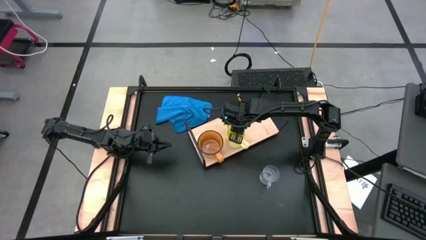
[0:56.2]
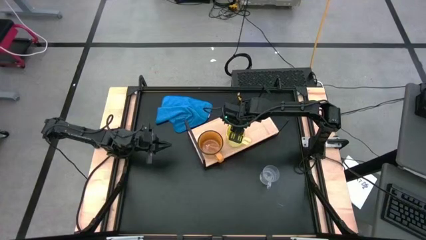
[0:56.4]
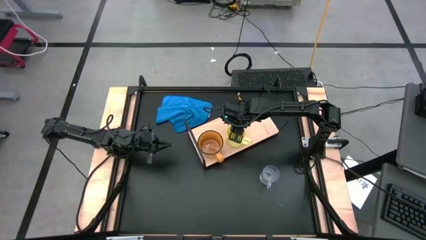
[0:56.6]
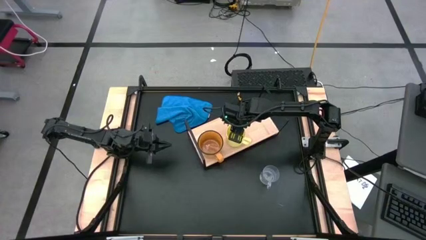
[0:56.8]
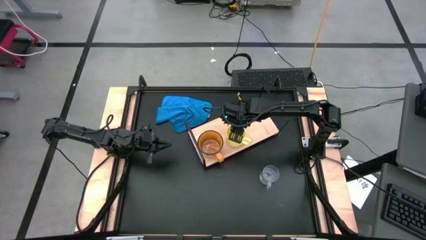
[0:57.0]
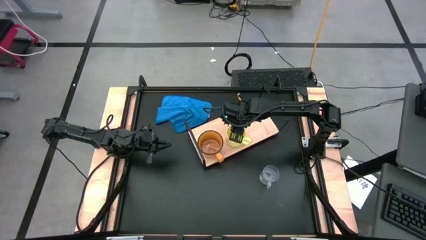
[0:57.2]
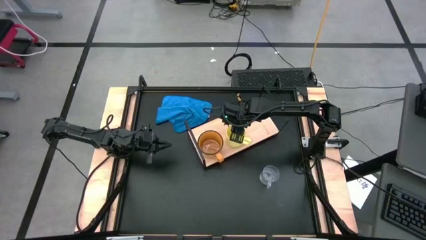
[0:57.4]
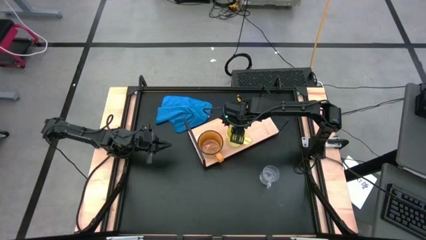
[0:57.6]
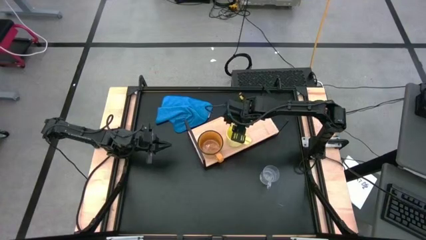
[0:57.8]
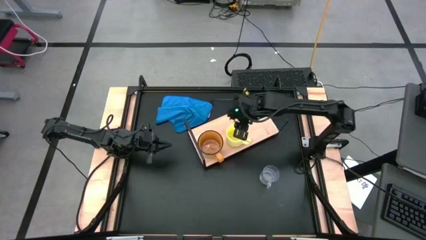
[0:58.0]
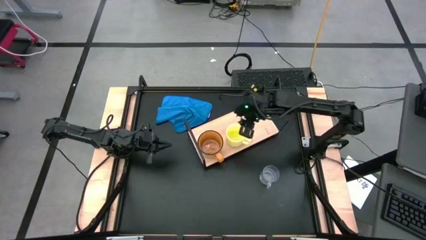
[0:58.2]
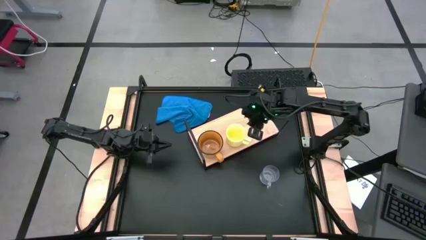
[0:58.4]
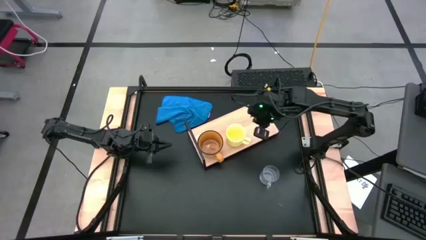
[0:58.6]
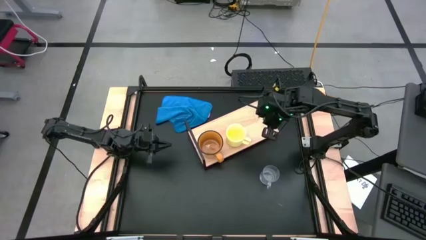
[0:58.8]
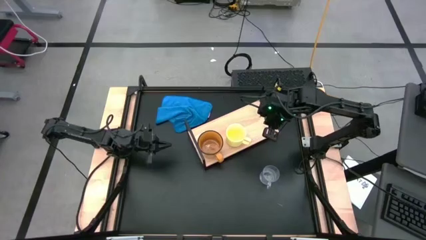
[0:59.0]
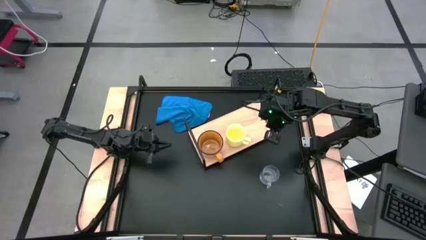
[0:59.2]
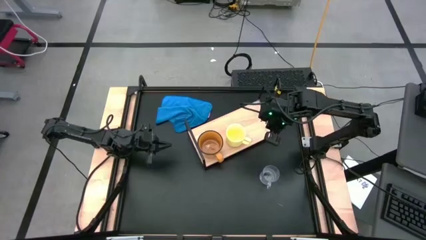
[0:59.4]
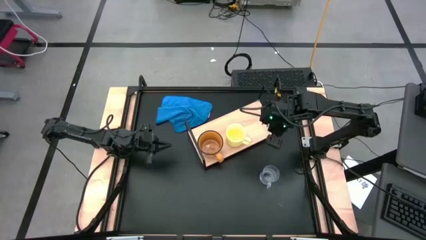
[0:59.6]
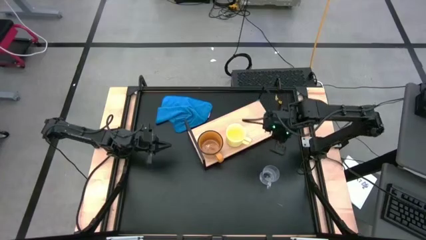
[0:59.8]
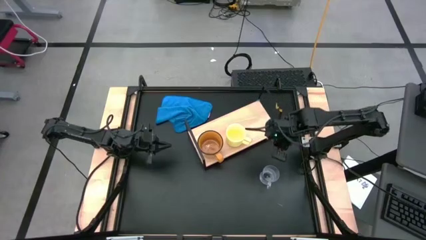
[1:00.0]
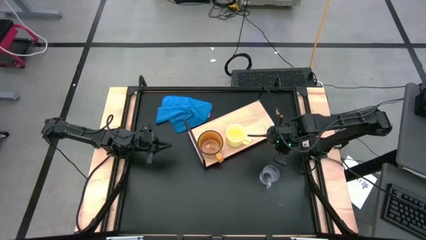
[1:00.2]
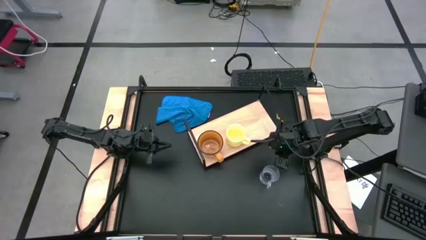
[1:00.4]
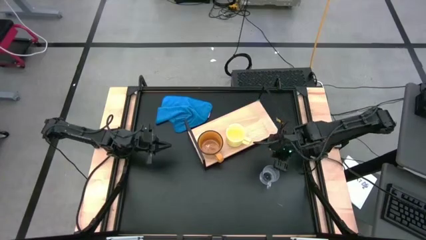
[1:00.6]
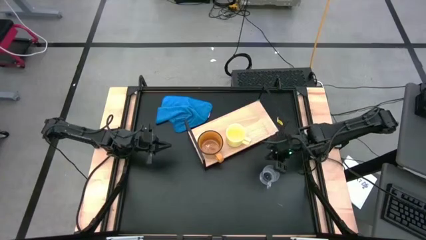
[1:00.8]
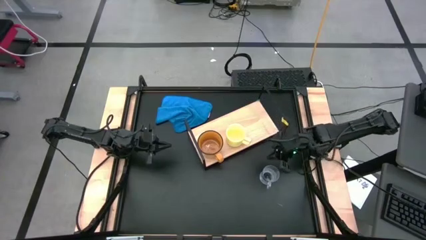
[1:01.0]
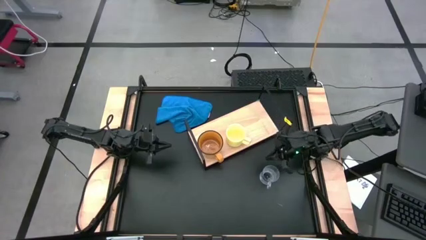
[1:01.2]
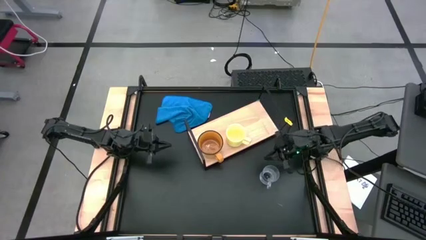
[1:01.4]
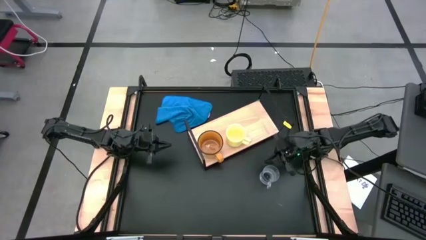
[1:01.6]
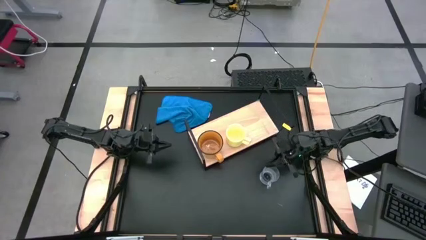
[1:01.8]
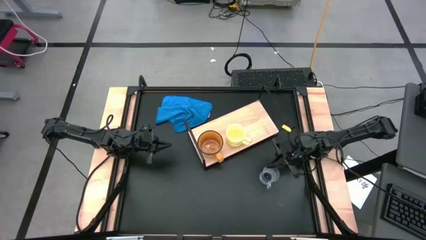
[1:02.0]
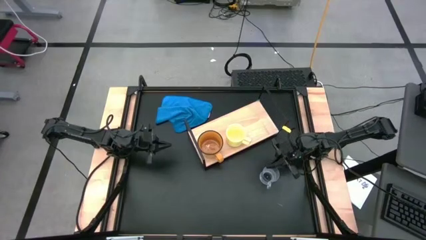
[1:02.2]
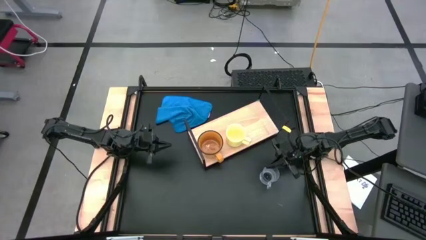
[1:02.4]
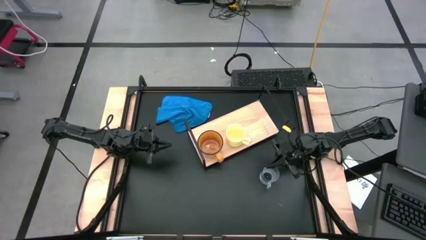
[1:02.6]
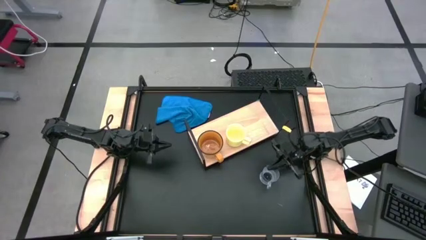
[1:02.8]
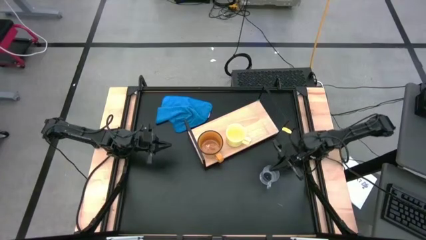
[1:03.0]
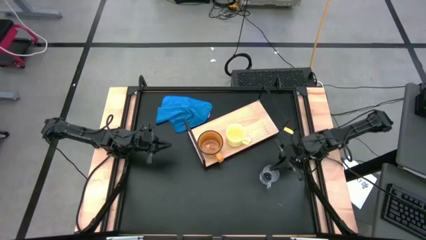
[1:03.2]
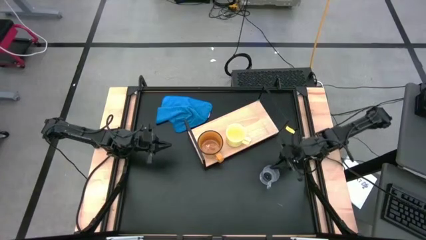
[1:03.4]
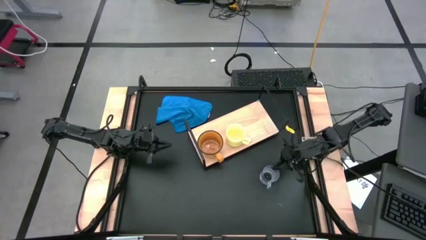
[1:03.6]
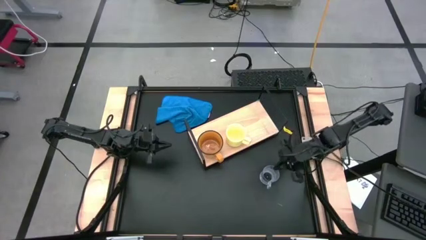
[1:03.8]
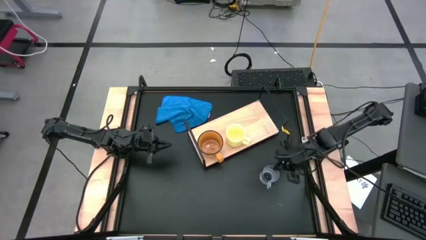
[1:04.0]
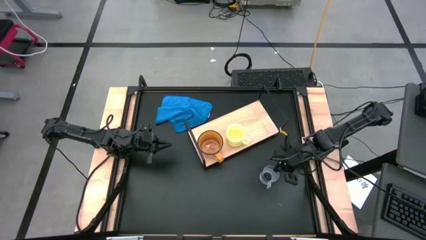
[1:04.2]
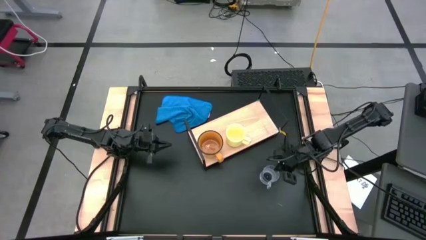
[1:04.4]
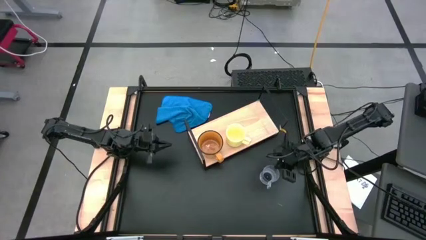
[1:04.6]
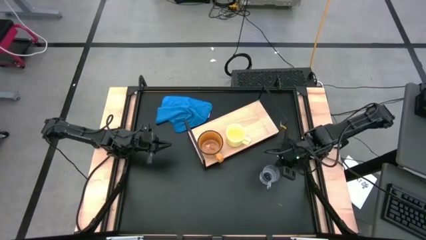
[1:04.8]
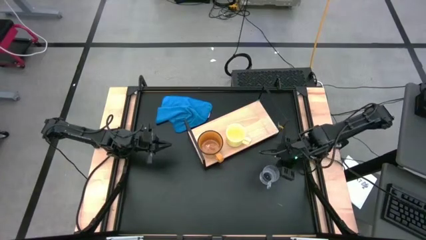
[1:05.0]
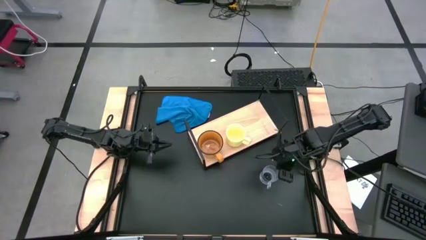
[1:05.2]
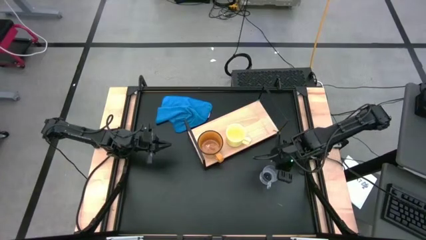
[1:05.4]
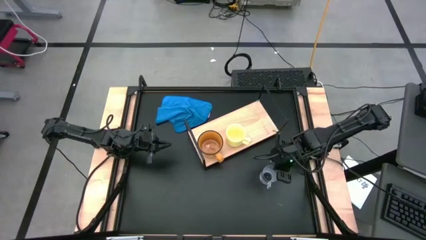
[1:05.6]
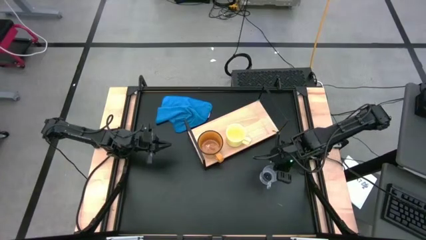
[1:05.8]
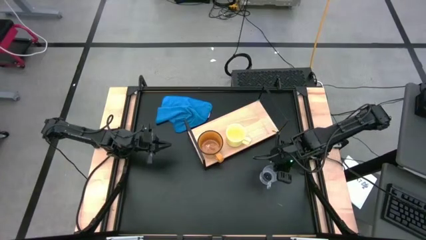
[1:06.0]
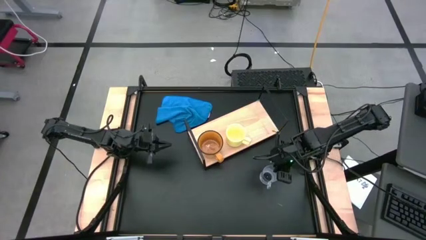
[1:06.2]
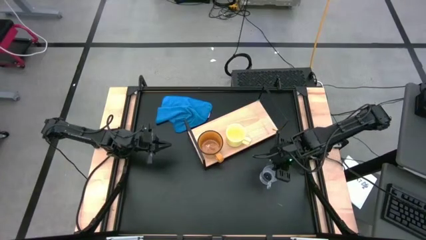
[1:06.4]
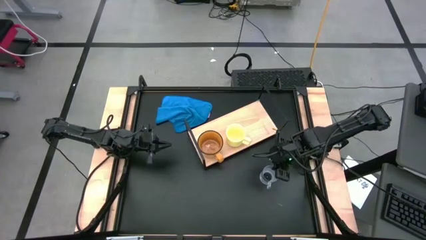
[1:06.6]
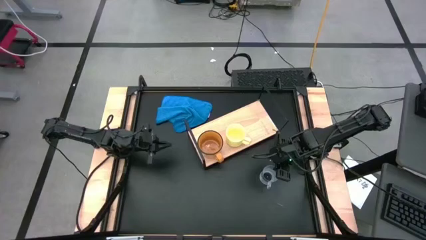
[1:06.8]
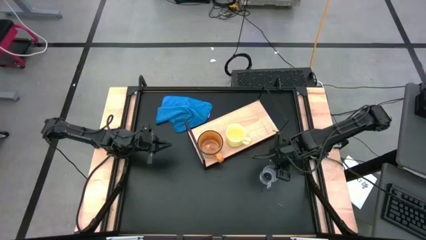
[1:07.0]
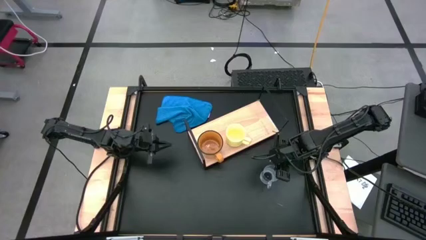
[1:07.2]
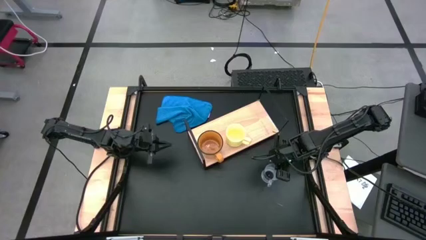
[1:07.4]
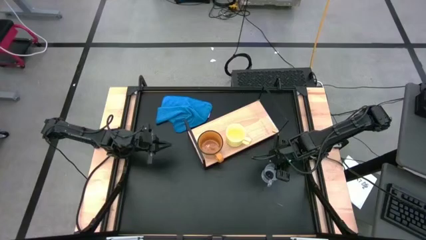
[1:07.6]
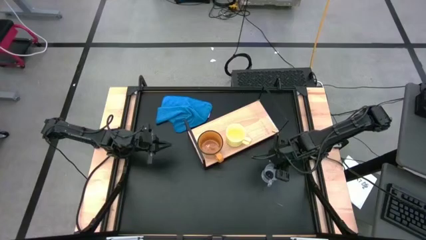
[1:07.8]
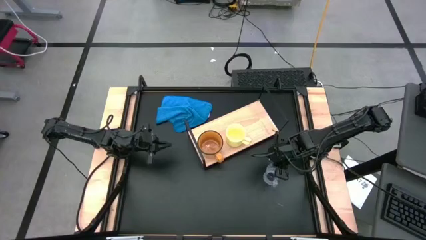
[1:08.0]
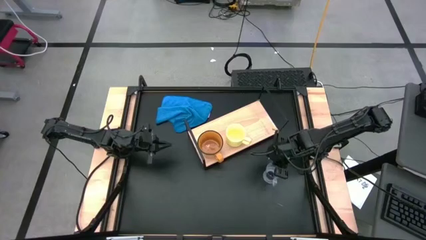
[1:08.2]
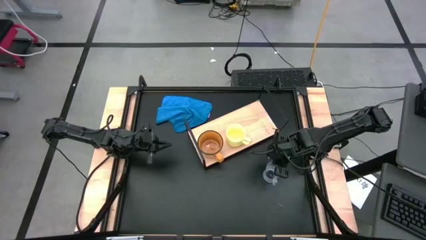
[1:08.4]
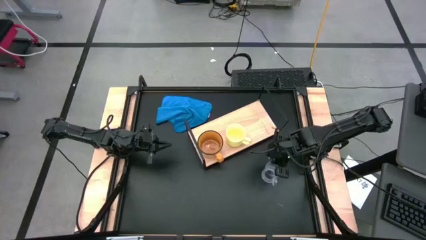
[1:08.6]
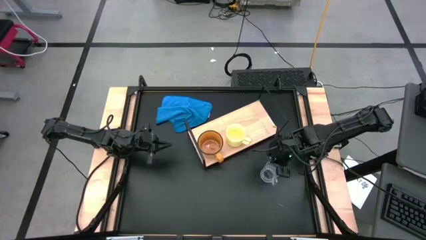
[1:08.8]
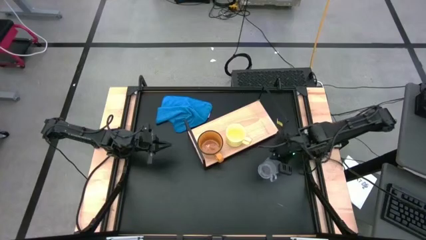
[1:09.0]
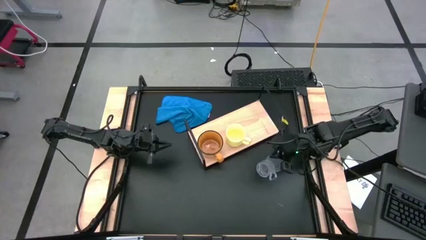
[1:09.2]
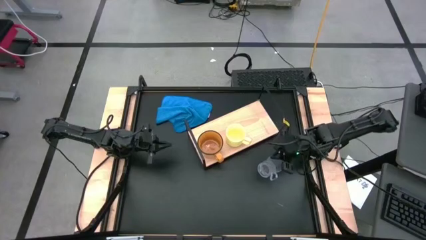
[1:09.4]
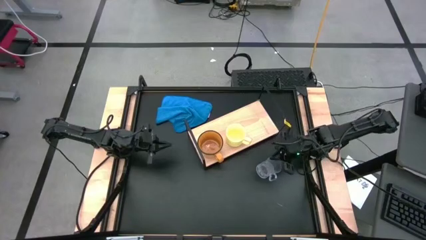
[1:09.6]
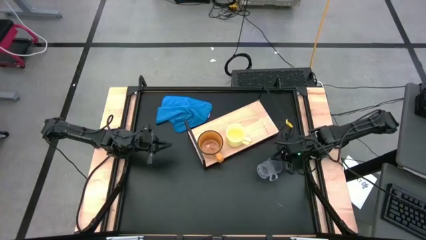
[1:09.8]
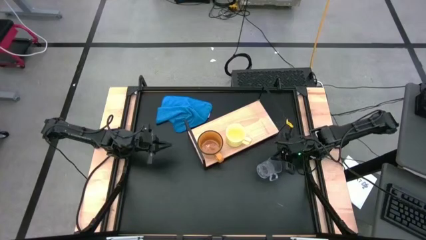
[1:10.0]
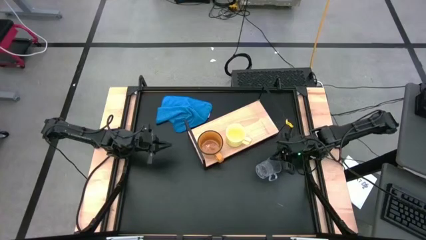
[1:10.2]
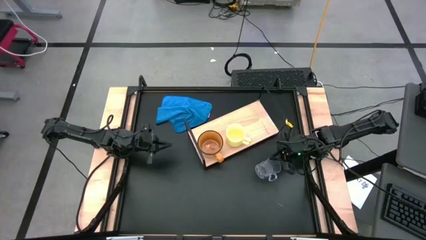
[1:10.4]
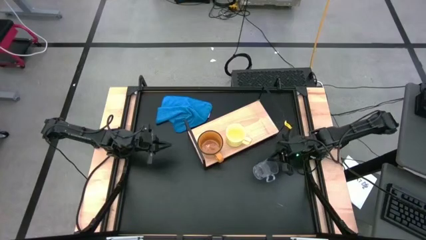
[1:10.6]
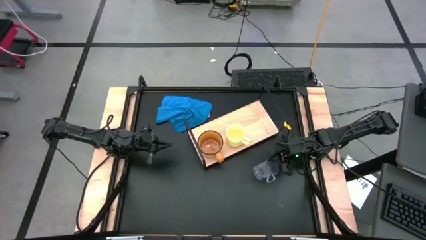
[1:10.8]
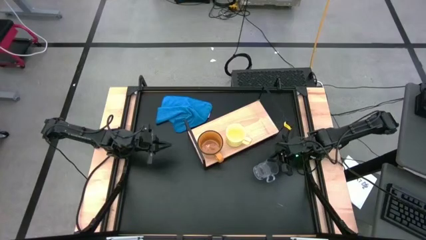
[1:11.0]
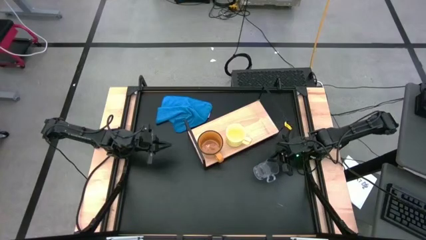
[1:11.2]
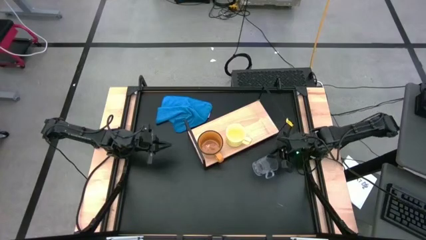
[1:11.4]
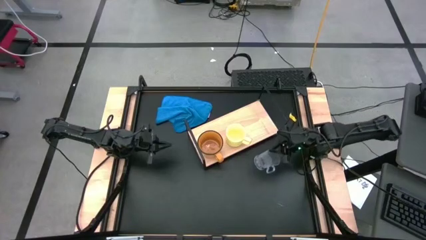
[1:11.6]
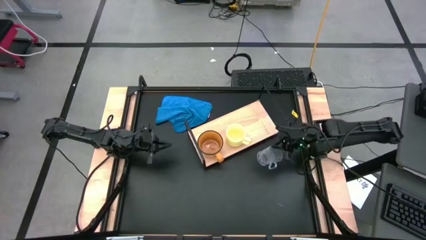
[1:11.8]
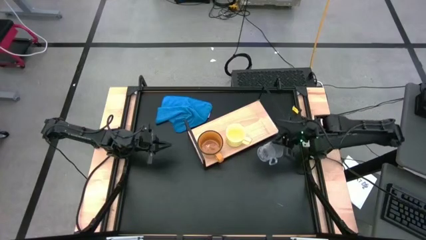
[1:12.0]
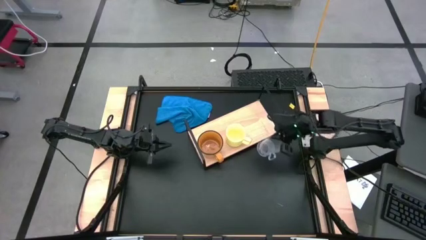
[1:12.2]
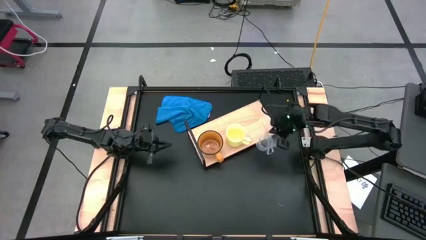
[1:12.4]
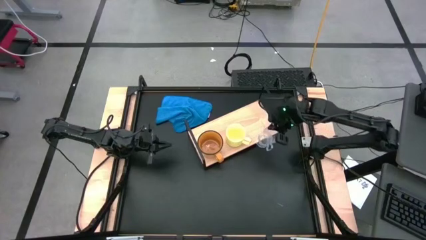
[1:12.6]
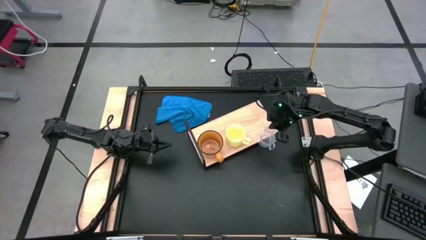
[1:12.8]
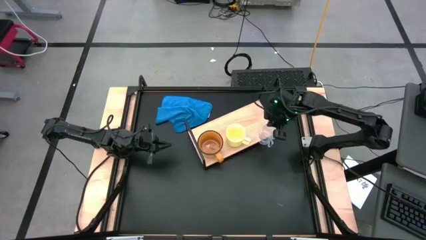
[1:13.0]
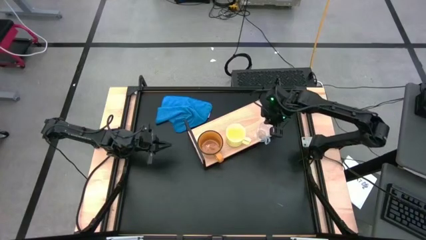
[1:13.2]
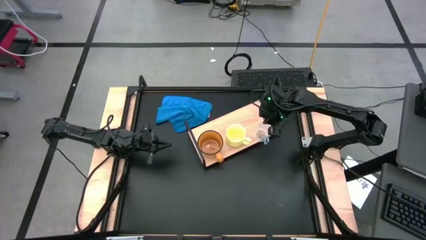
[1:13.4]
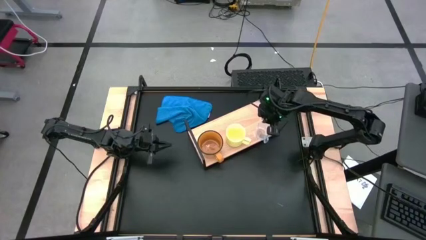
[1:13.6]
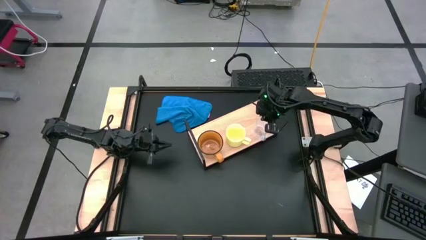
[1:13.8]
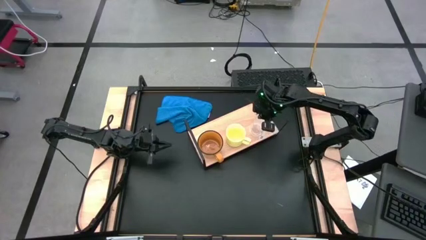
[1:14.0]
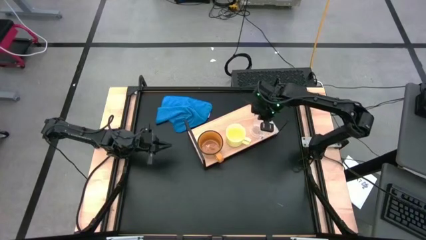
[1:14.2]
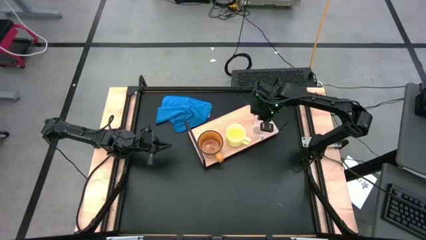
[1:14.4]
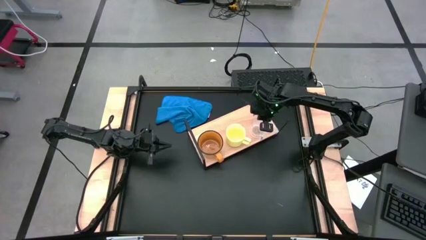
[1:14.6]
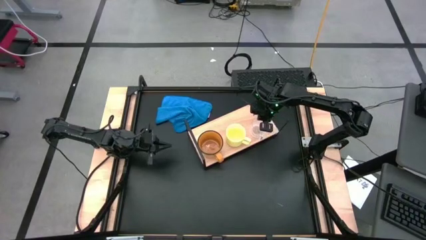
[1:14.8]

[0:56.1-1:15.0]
Task: Stack small to large cups/mugs on shelf
Put the transparent mug on the shelf
